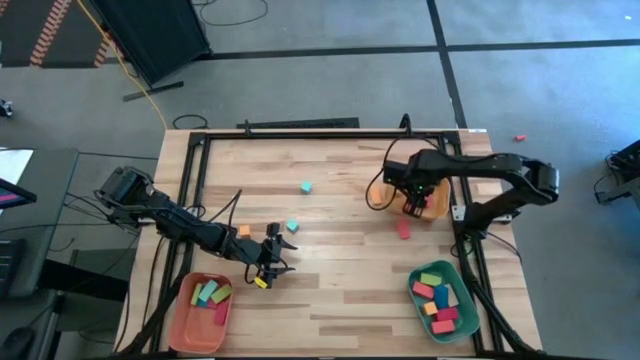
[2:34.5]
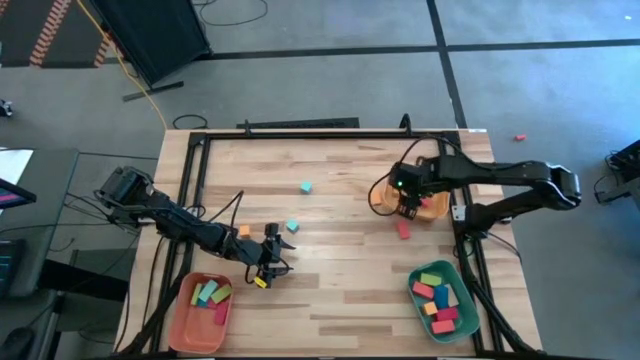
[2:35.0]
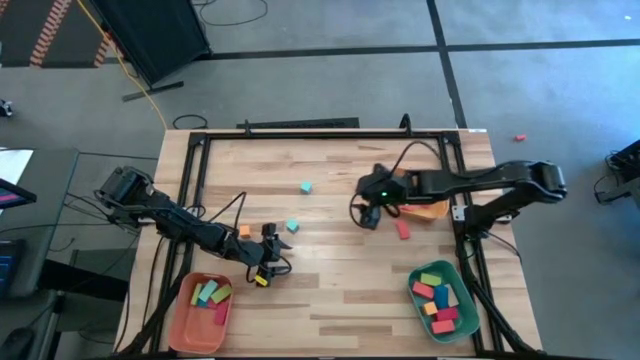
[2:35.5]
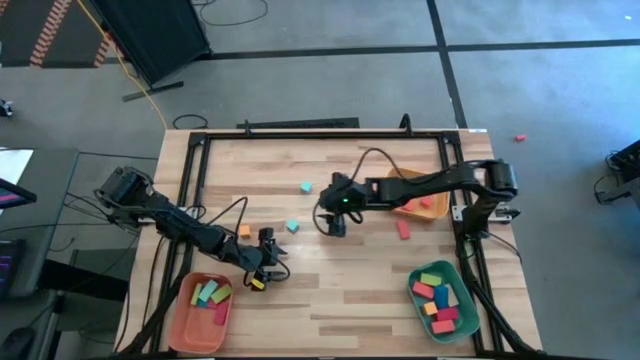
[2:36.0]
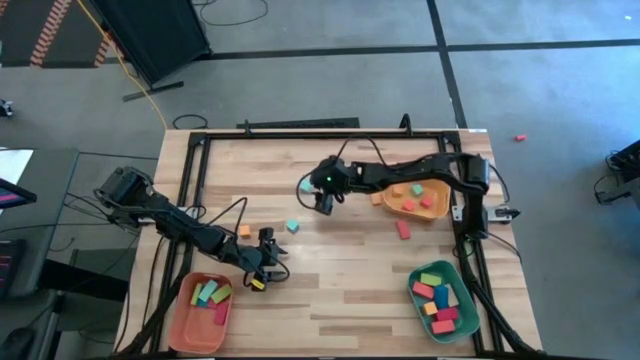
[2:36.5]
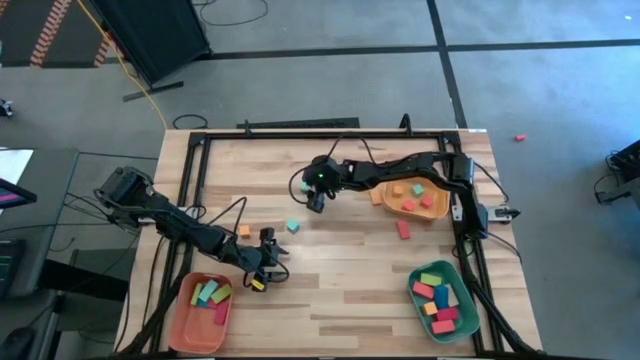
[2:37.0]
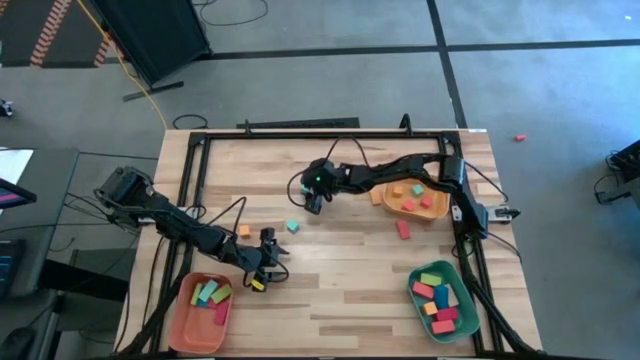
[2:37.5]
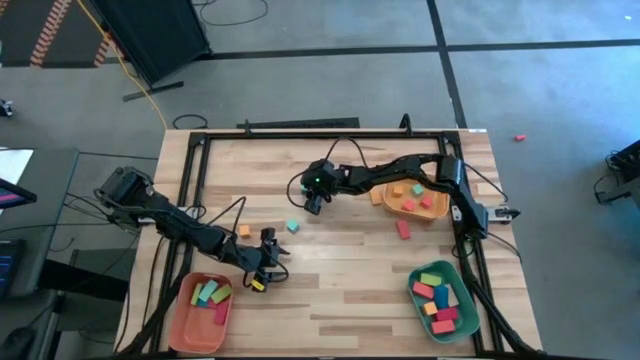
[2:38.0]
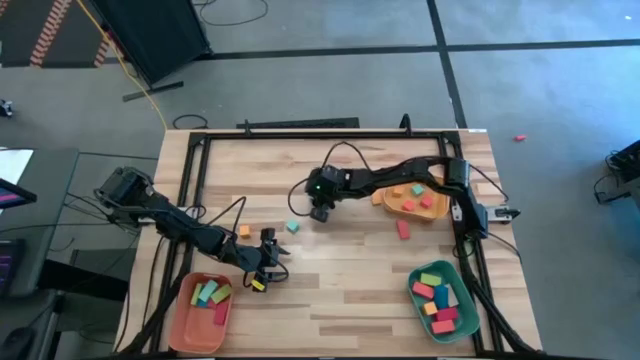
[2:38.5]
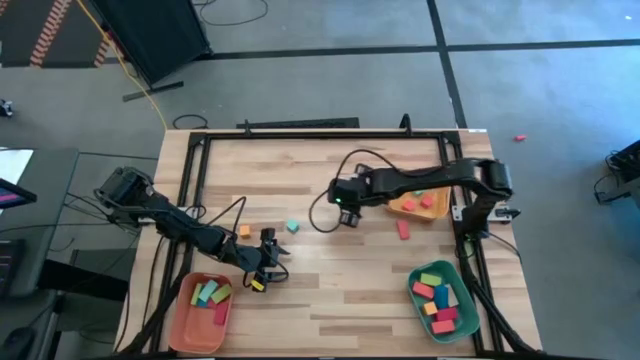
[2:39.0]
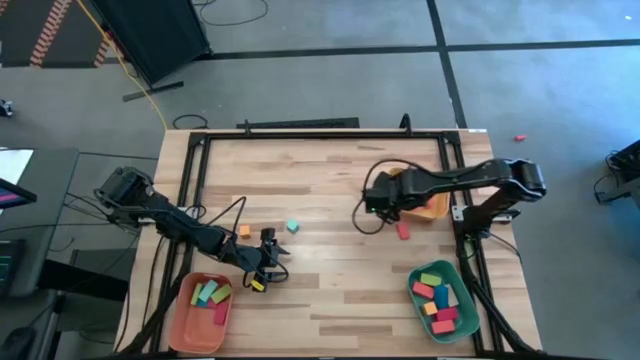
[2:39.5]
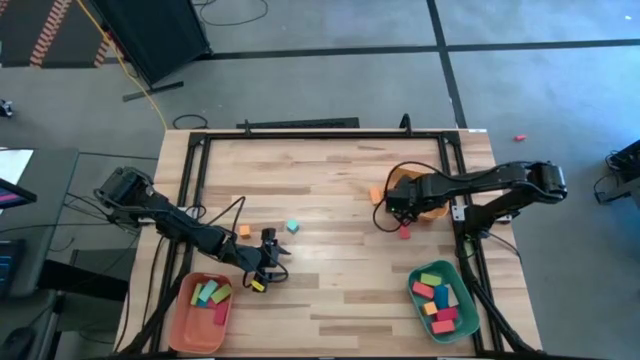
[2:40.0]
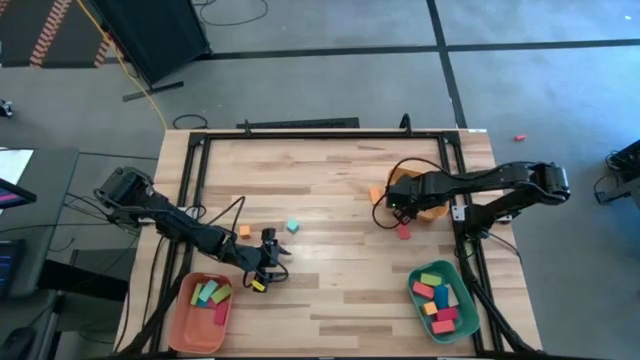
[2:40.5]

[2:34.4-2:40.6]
Task: Sort blocks by size
Put the small light blue block into the yellow bin

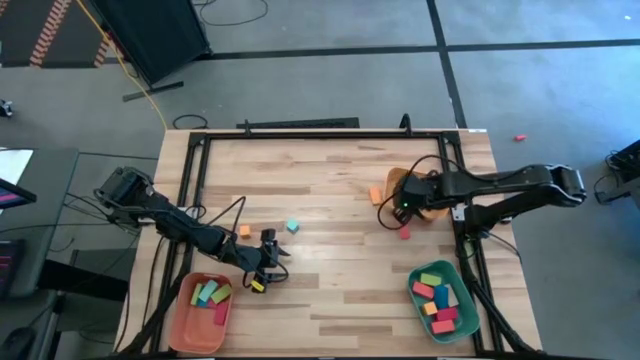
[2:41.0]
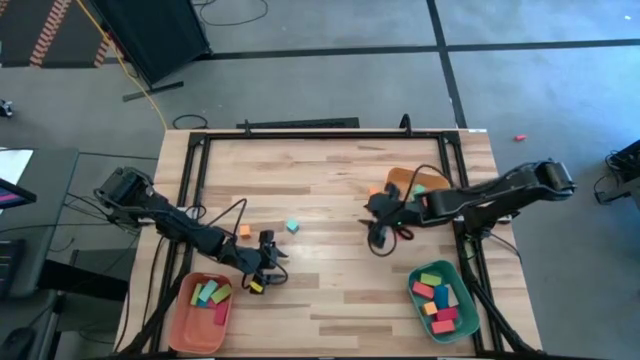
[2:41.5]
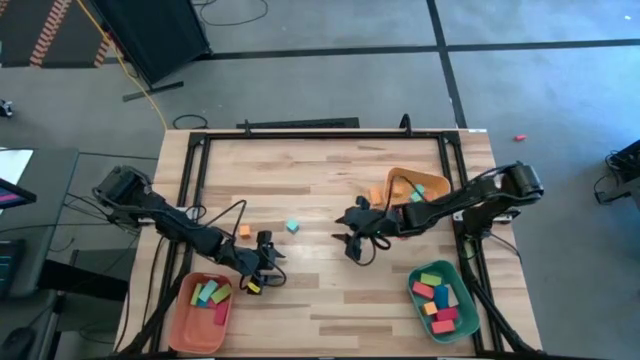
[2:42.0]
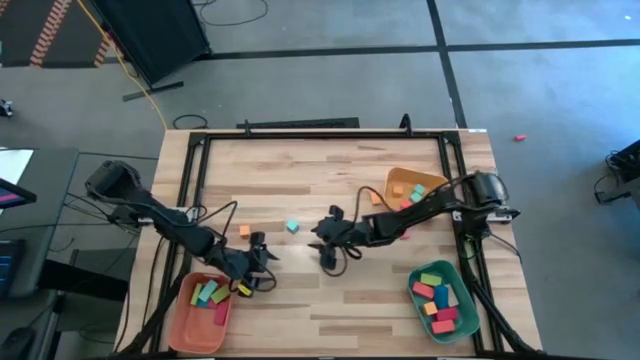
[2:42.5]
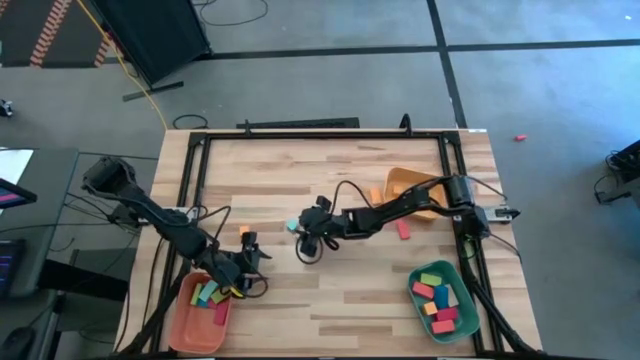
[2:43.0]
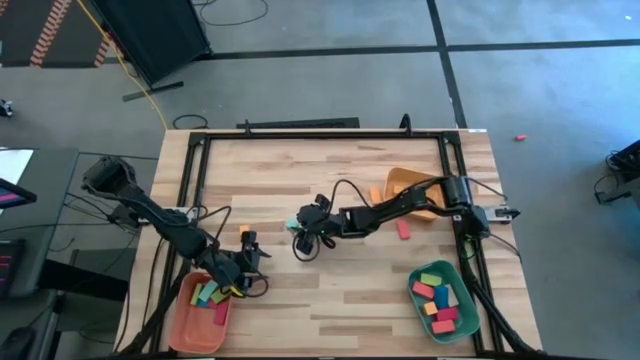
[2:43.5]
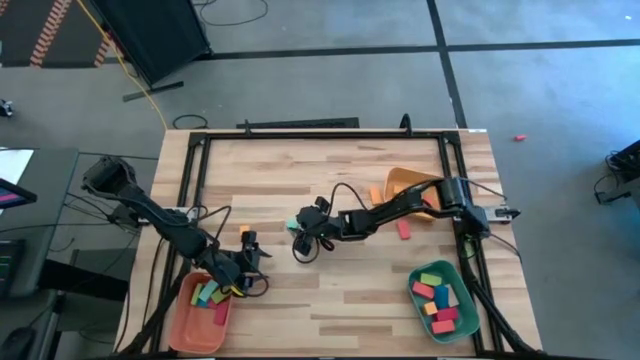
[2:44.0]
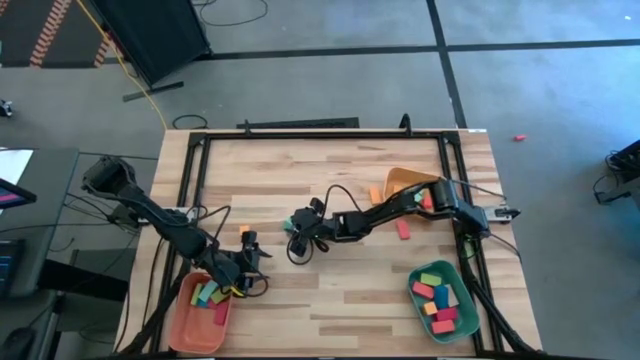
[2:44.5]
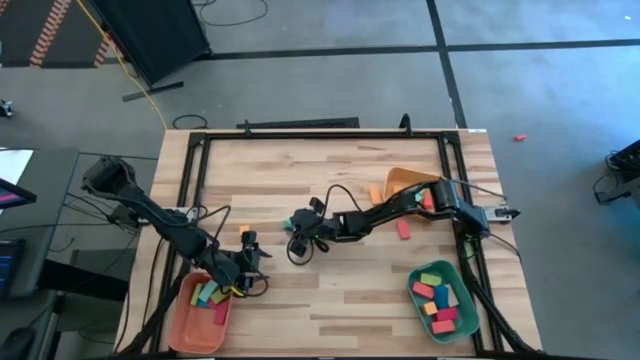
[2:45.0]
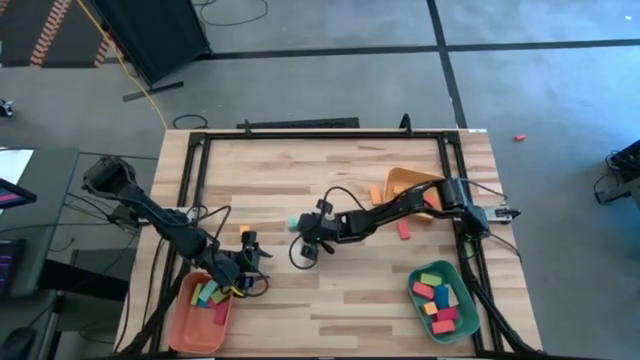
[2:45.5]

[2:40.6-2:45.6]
Put the small light blue block into the yellow bin

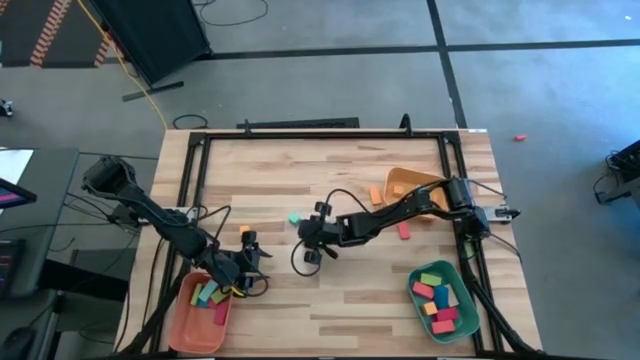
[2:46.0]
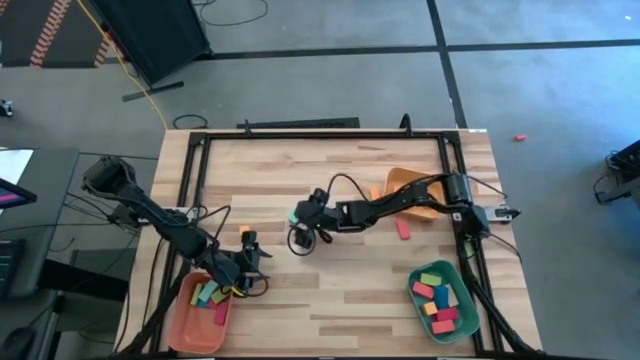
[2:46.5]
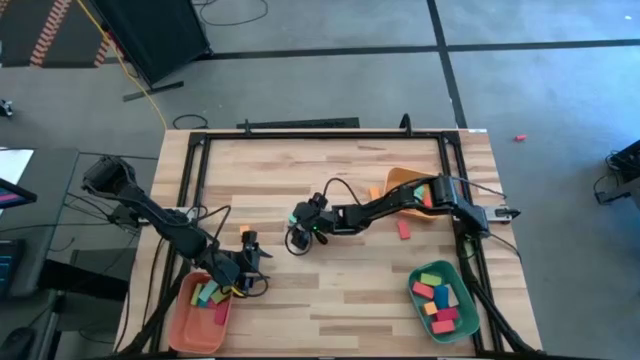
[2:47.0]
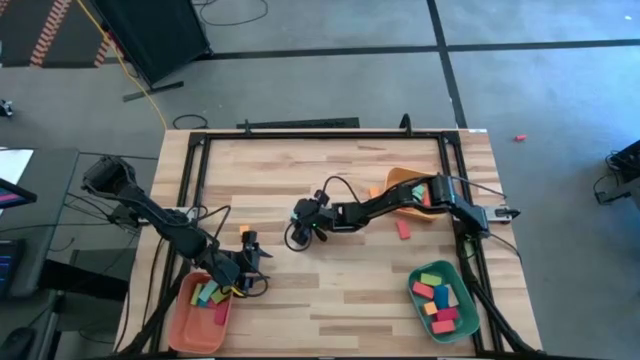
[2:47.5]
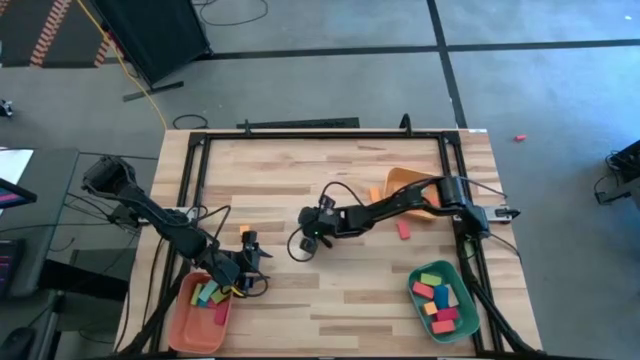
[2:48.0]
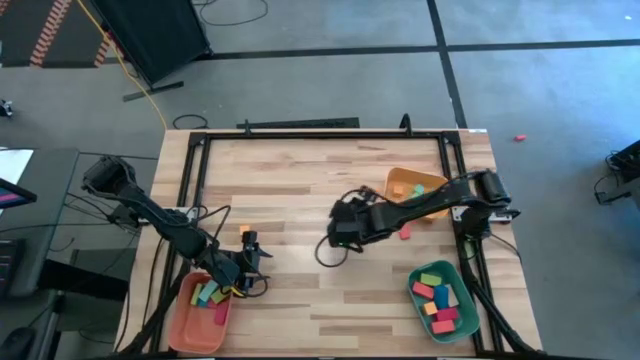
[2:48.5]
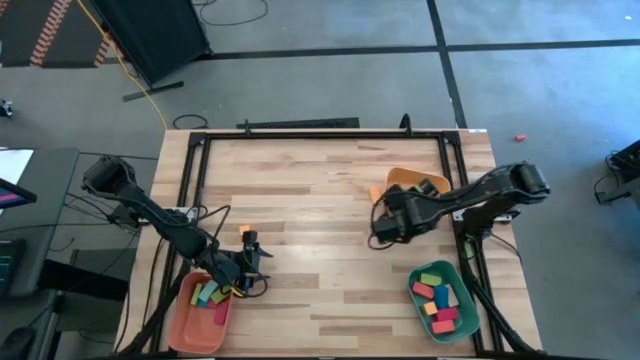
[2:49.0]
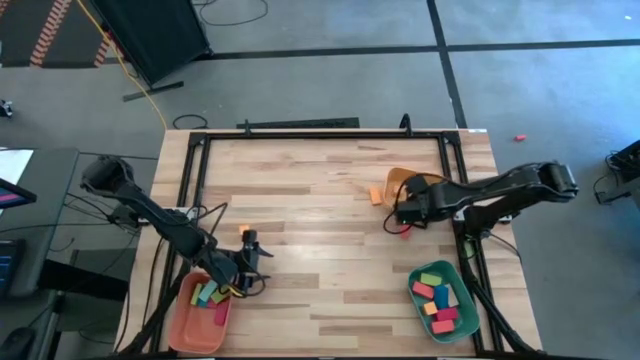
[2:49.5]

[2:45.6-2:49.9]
Put the small light blue block into the yellow bin

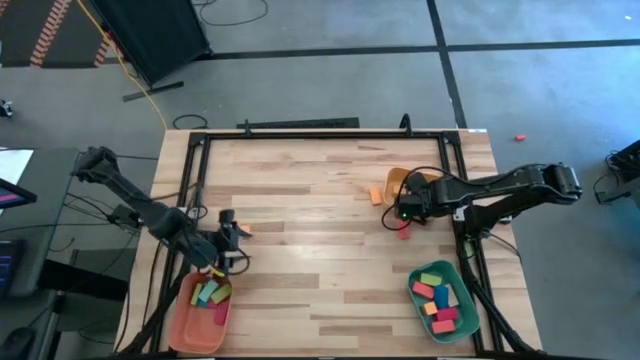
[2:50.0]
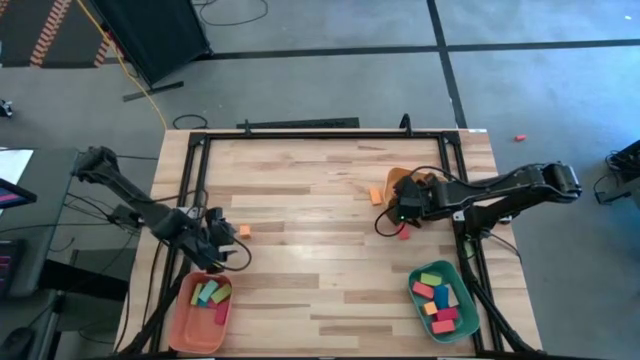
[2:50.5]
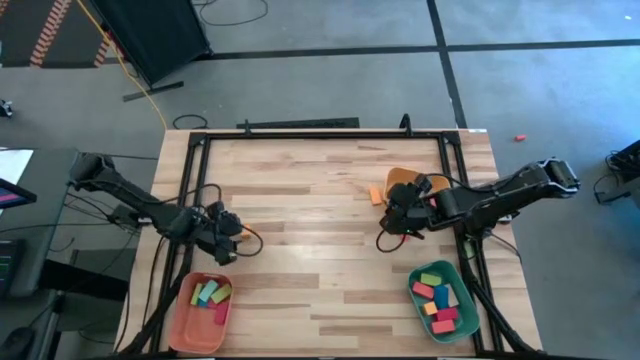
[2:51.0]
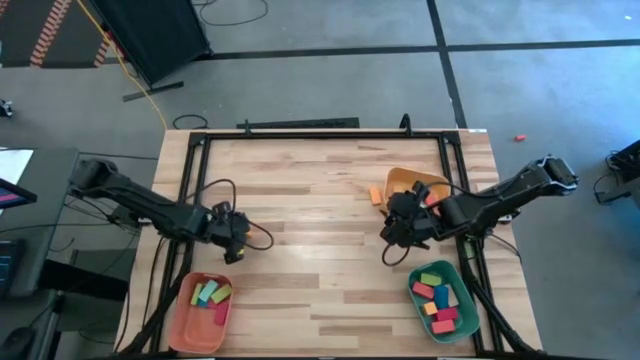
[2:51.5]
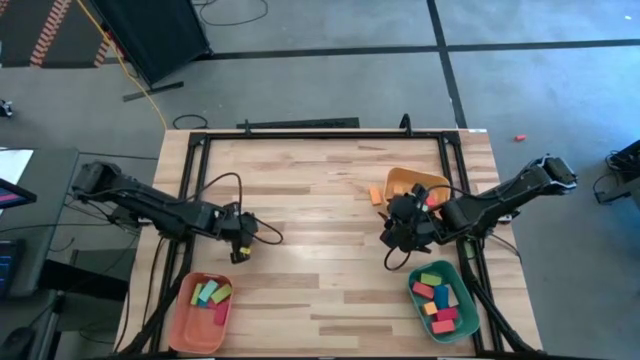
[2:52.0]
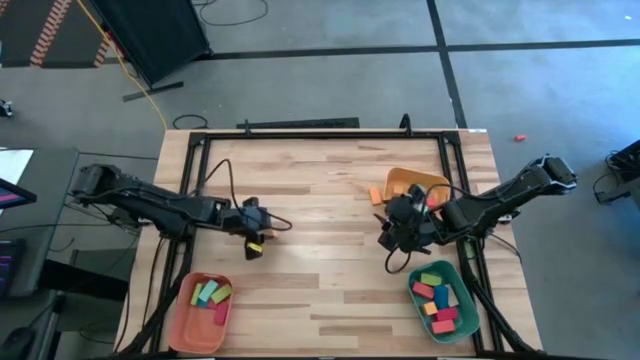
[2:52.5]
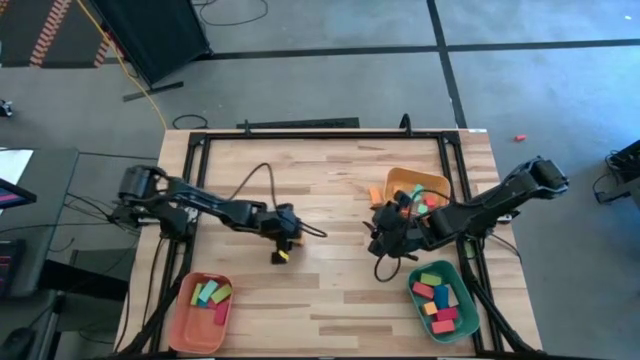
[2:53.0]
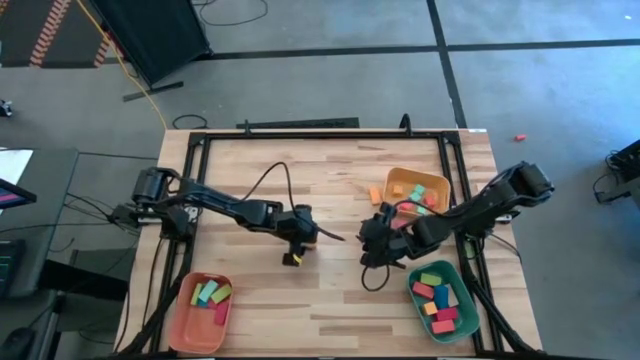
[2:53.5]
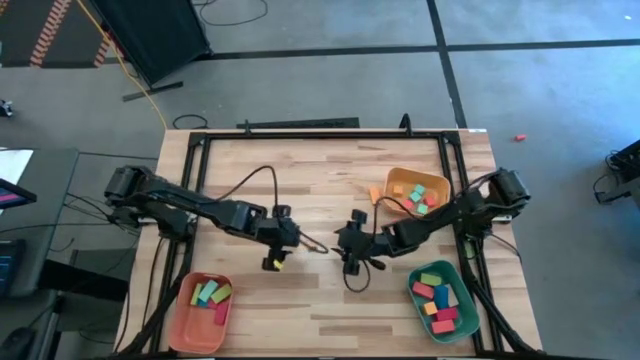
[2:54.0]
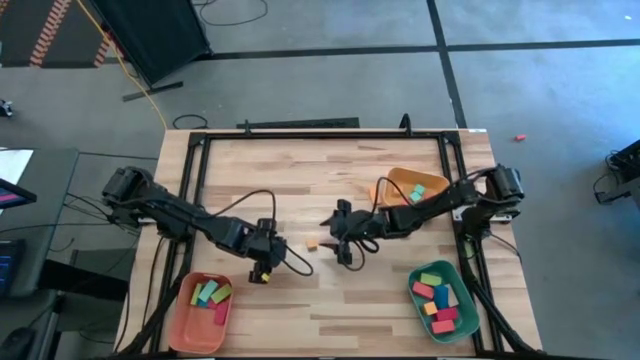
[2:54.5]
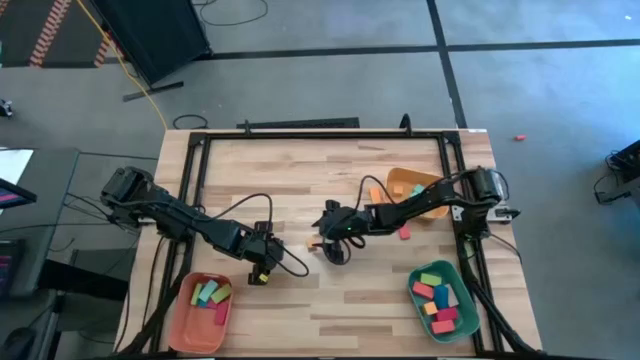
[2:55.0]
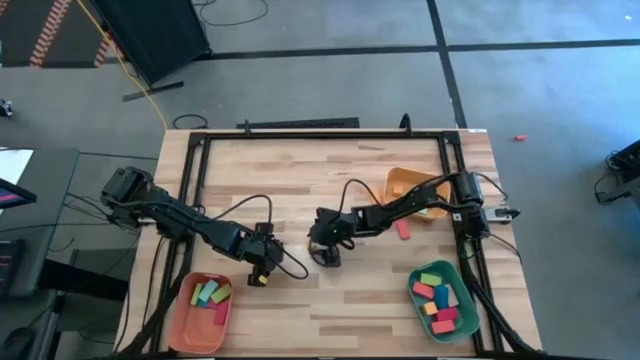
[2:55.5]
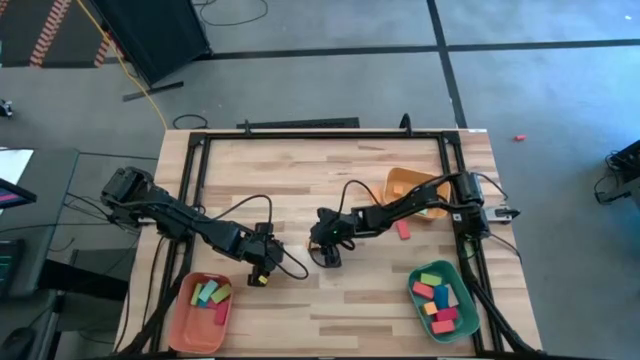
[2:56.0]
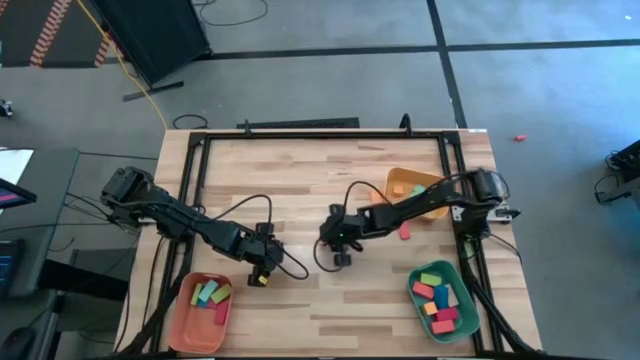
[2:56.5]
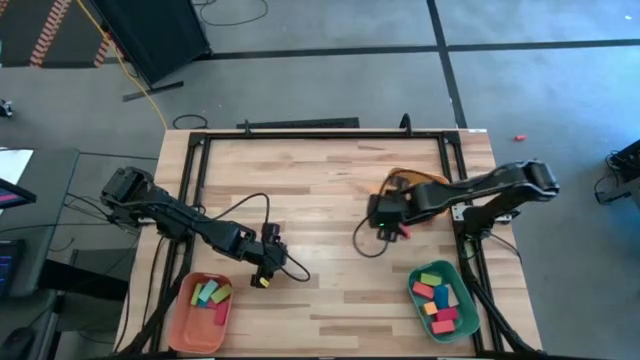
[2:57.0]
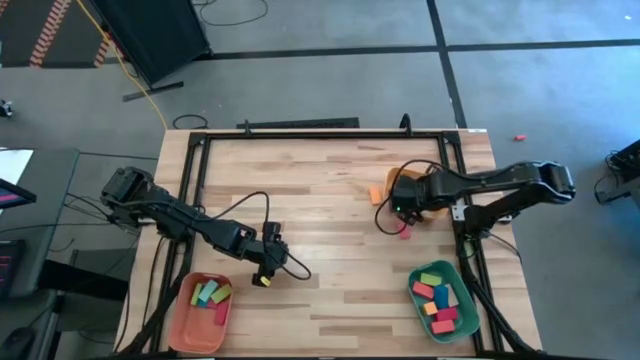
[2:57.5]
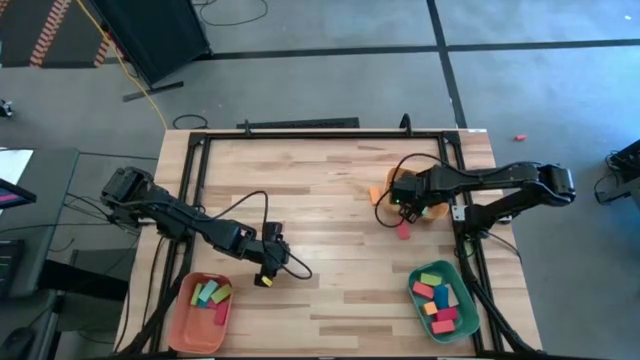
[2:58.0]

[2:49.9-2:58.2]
Put the small yellow block into the yellow bin
